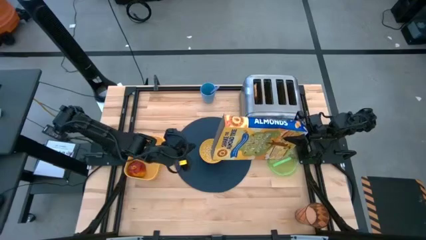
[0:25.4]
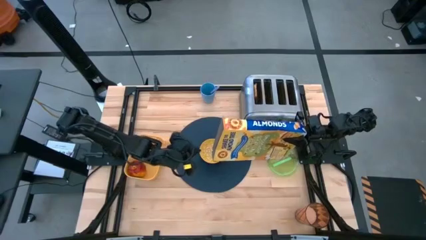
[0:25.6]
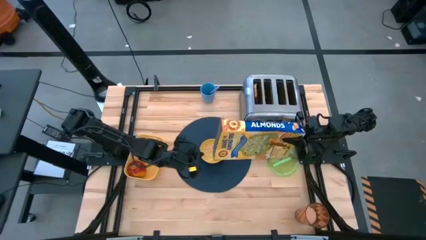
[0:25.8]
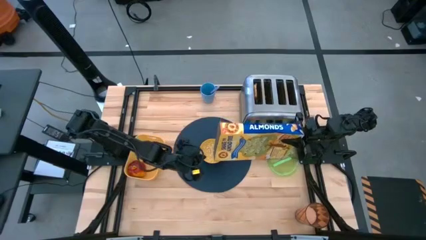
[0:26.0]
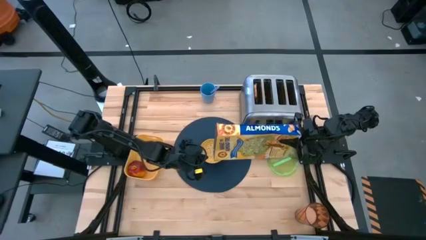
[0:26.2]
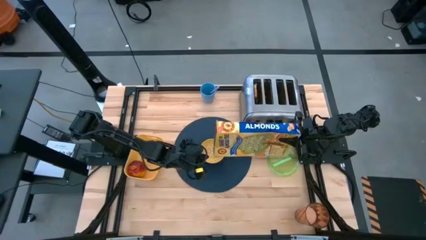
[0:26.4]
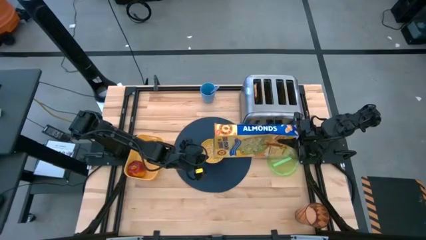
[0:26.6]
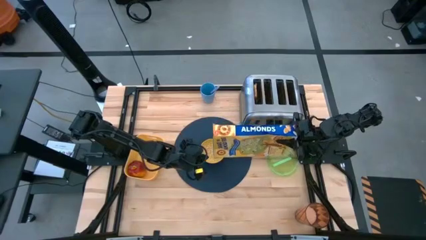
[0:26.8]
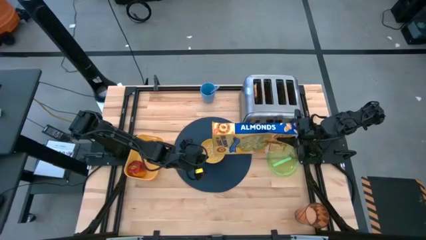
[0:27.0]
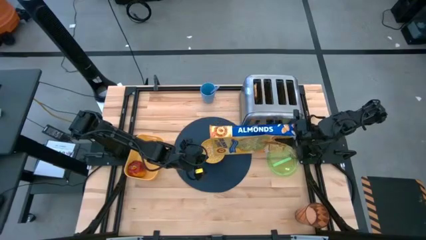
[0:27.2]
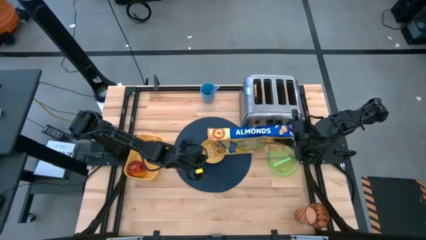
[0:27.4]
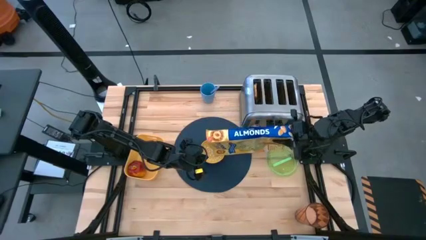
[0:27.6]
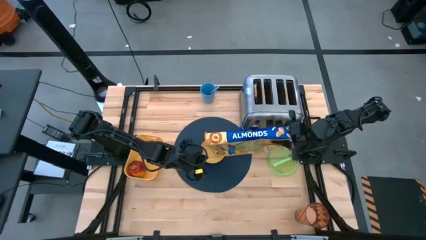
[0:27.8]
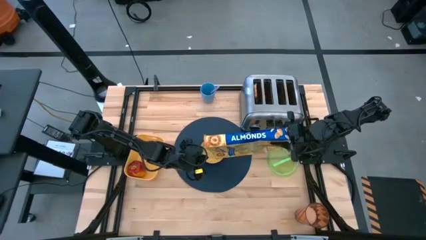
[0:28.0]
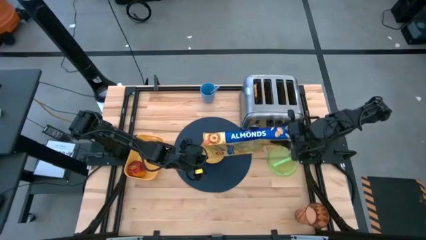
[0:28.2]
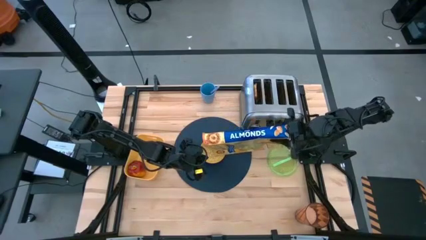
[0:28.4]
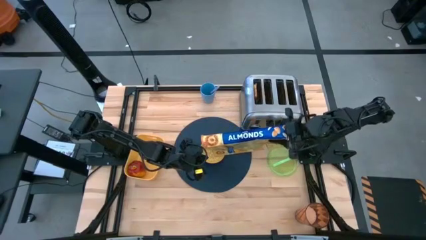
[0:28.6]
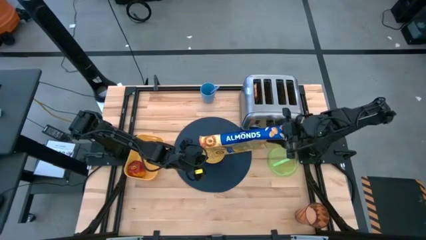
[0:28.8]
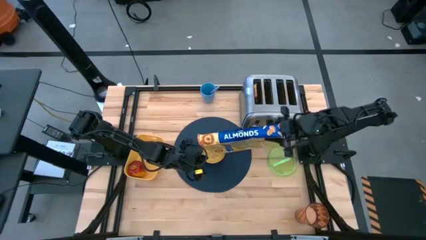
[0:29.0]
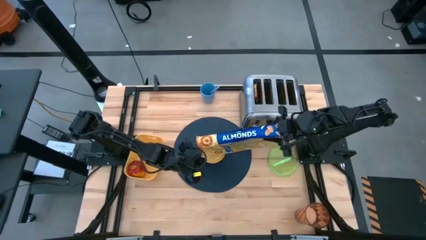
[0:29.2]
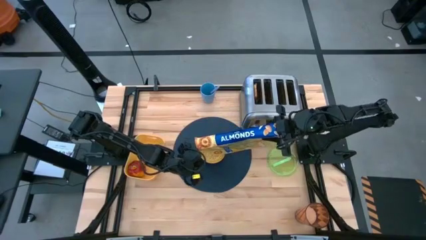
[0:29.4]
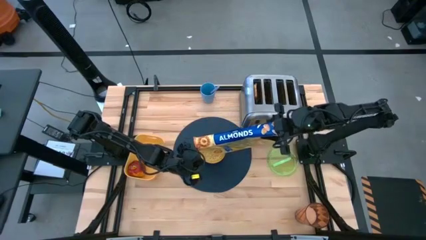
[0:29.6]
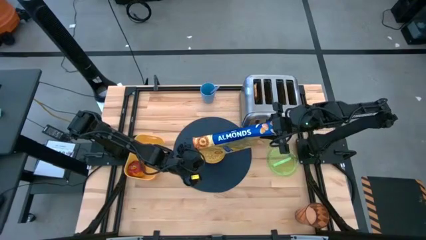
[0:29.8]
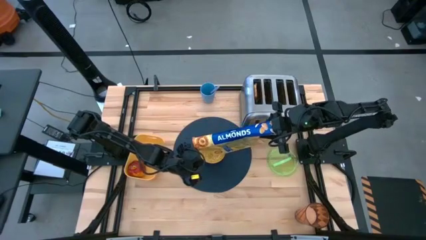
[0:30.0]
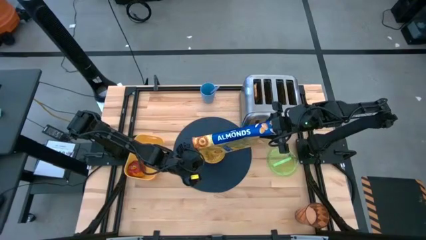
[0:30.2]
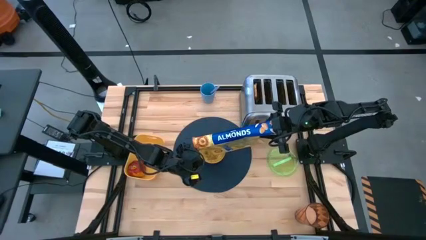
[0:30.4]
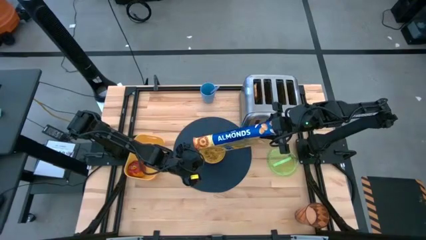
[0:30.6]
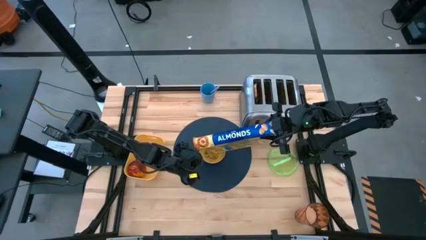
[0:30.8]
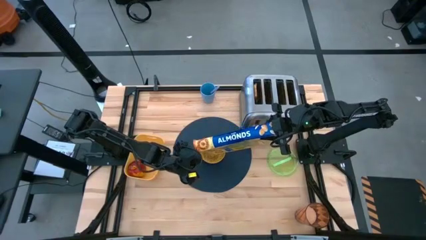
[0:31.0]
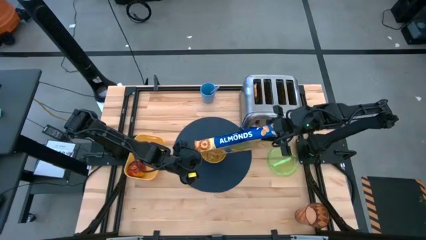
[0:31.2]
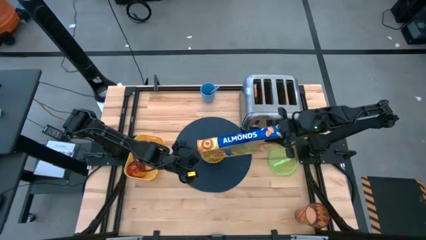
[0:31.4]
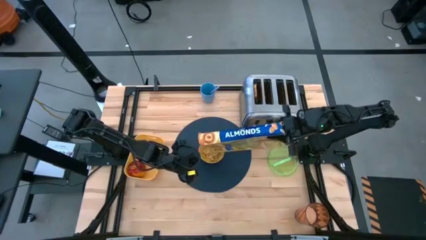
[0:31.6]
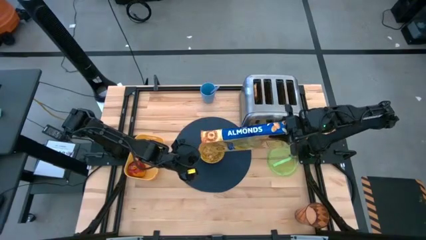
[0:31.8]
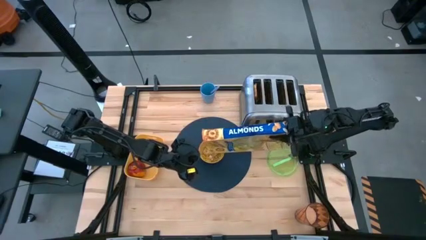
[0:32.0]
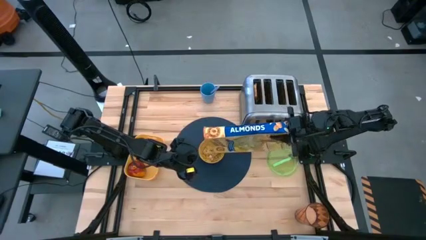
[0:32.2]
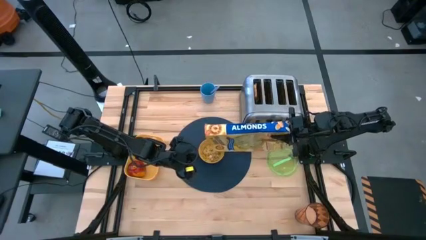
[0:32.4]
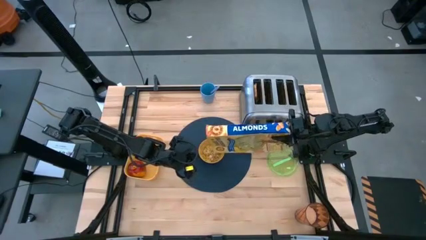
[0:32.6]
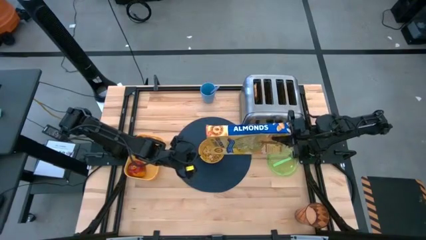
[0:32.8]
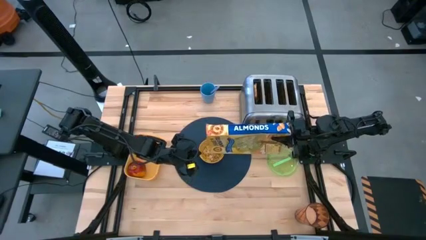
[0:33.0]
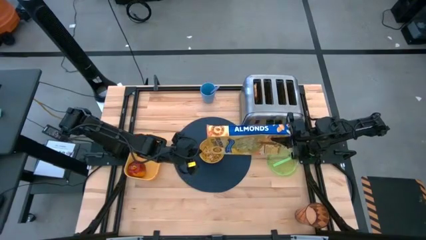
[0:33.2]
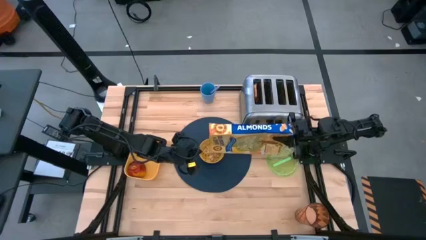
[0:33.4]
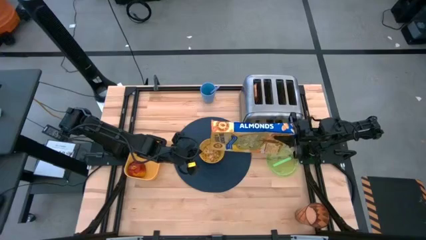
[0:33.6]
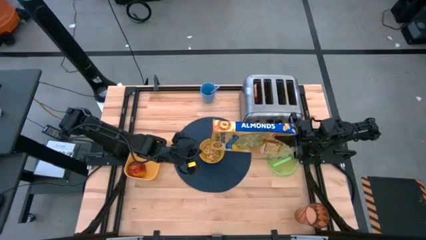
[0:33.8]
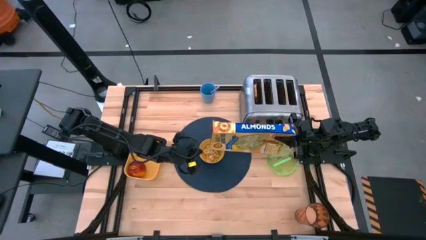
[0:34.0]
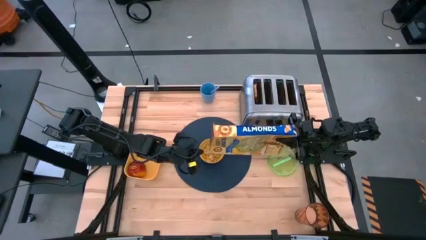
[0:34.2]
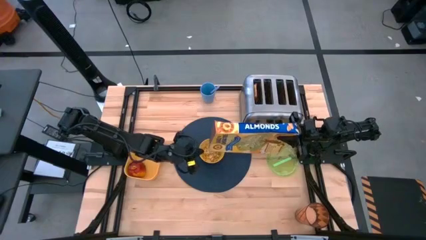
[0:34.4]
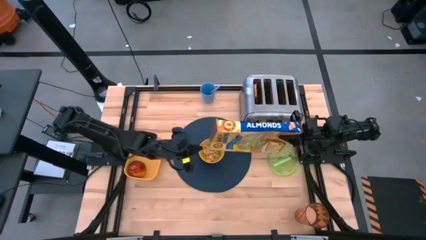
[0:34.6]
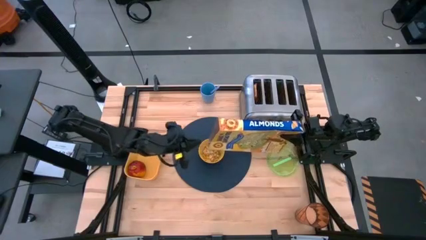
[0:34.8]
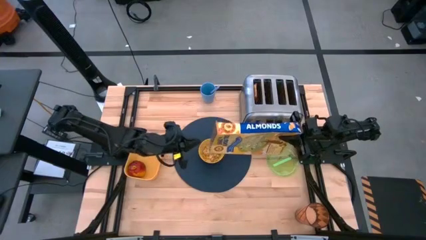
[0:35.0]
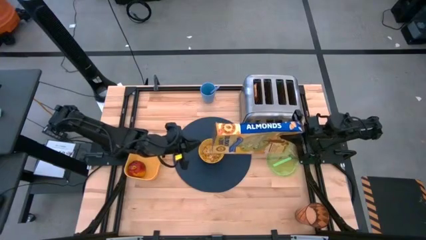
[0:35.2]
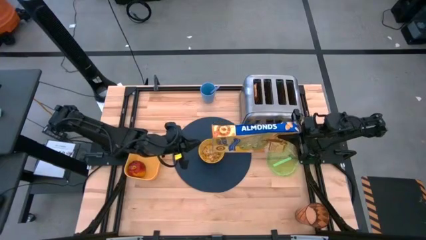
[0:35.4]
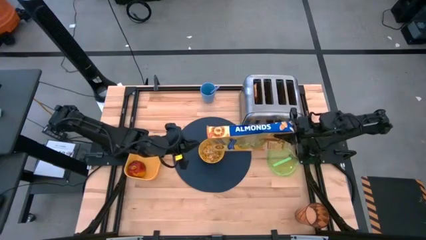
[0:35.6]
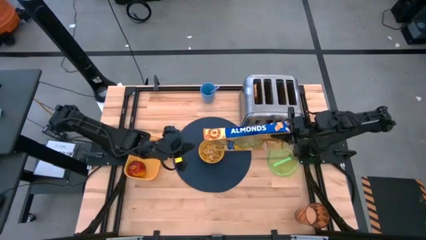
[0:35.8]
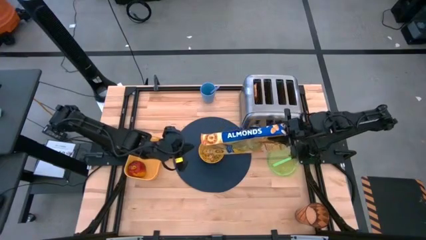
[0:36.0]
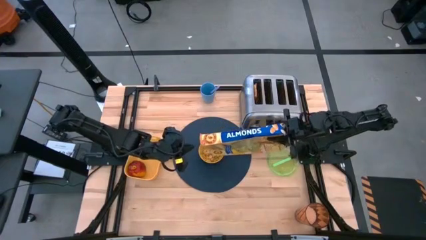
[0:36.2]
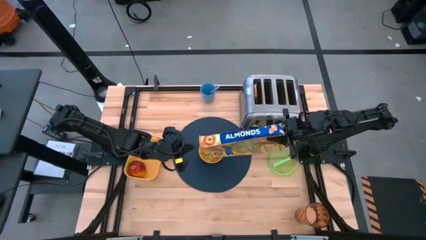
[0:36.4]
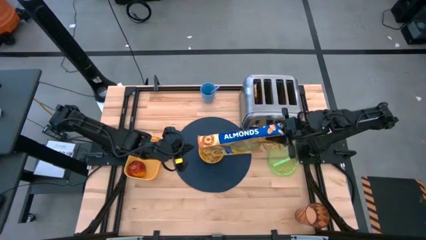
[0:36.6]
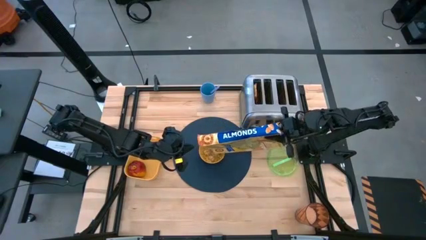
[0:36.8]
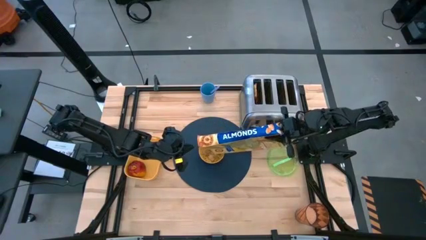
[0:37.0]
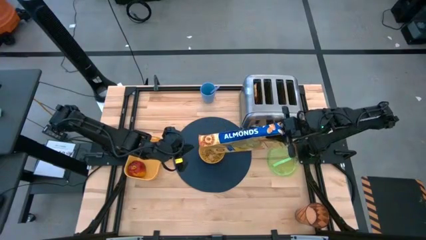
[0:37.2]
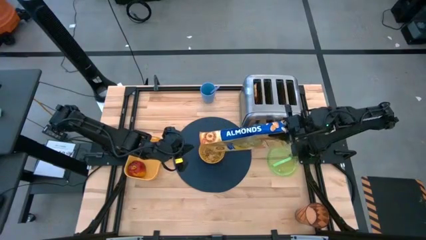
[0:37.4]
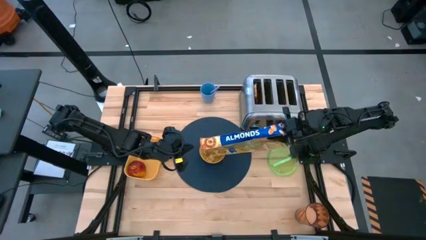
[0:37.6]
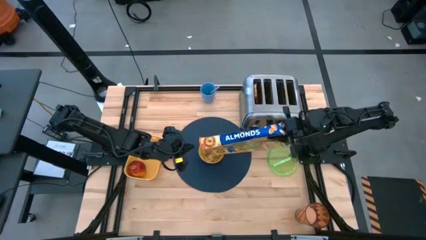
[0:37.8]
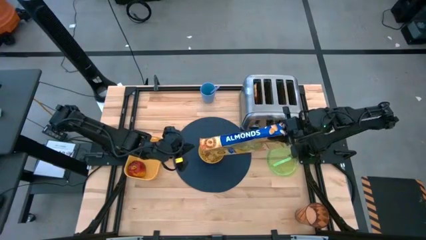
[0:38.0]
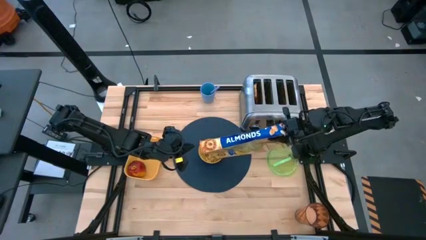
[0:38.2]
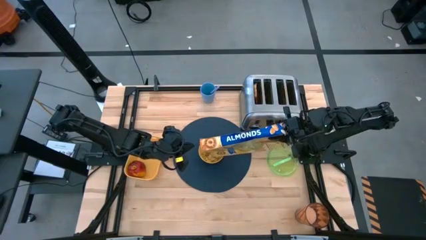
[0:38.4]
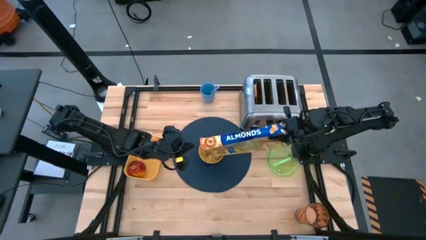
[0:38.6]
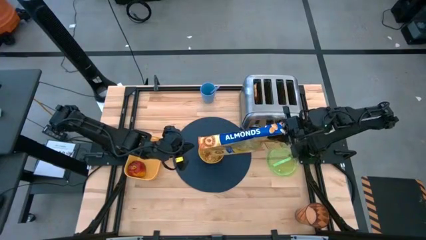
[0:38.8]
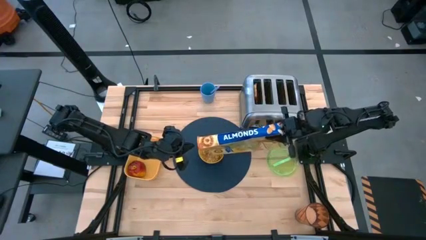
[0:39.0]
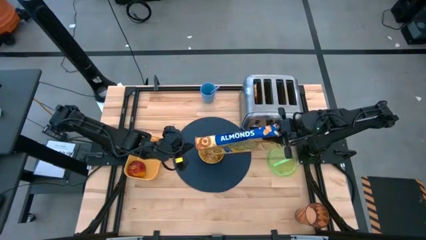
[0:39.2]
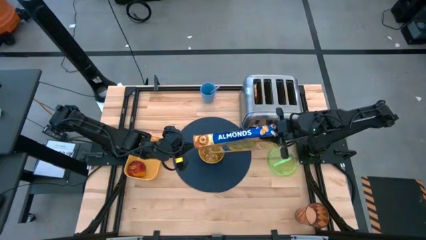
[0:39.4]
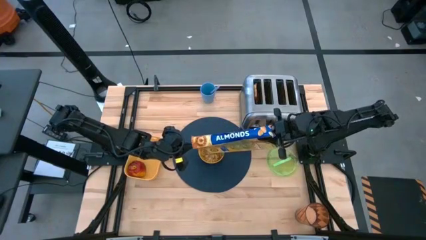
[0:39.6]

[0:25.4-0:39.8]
Task: Arrange a breakfast setting
Pour the cereal from the cereal box into the bowl

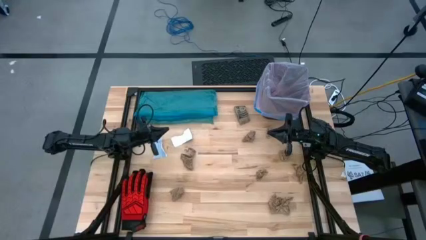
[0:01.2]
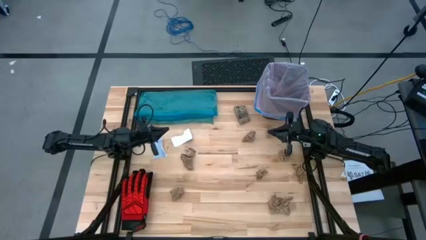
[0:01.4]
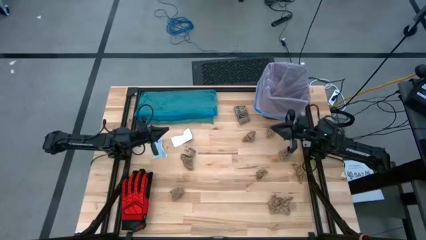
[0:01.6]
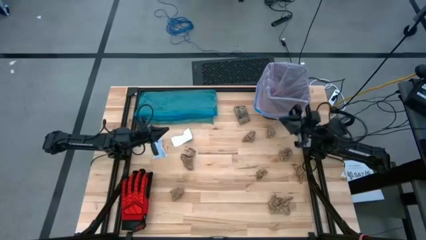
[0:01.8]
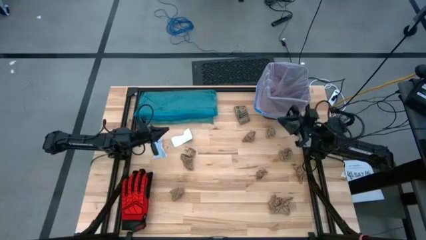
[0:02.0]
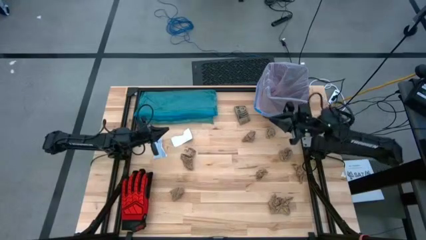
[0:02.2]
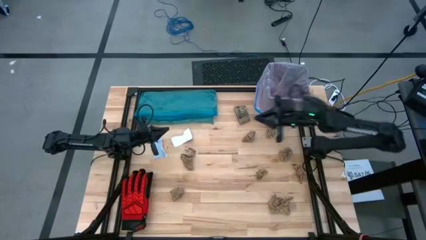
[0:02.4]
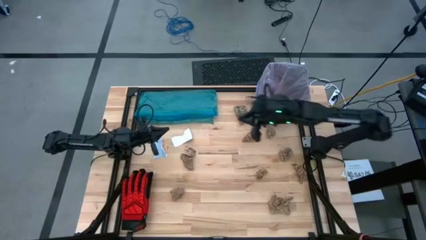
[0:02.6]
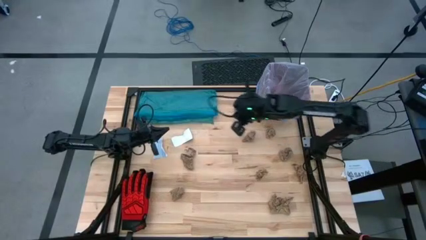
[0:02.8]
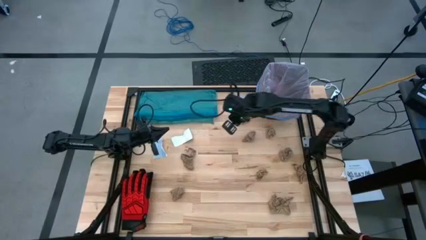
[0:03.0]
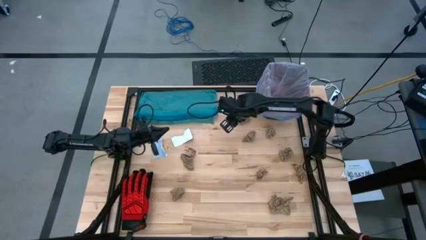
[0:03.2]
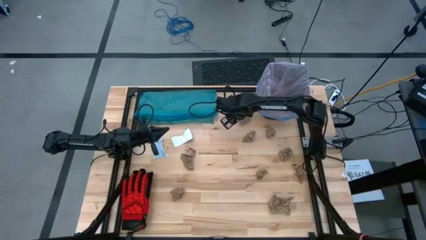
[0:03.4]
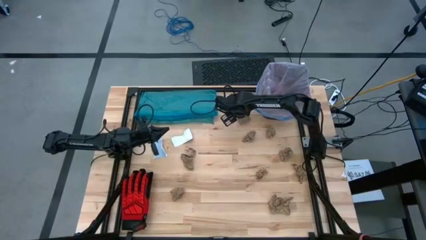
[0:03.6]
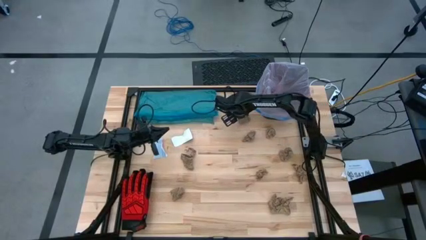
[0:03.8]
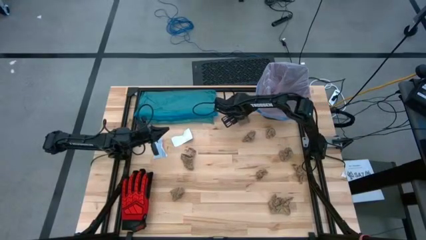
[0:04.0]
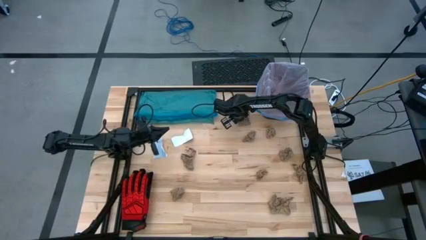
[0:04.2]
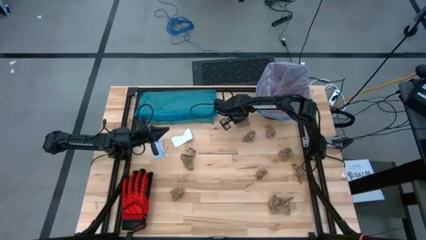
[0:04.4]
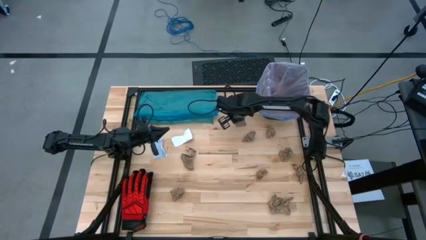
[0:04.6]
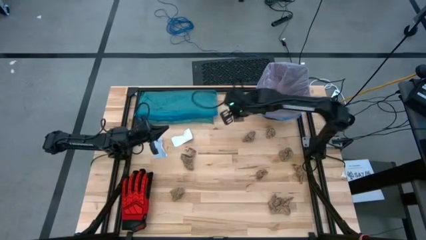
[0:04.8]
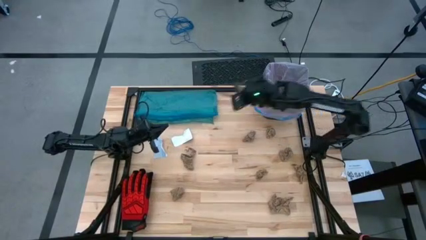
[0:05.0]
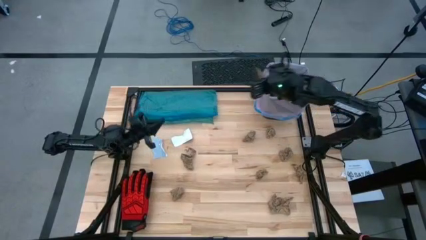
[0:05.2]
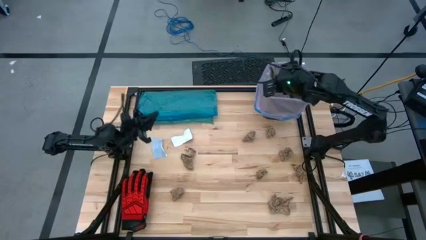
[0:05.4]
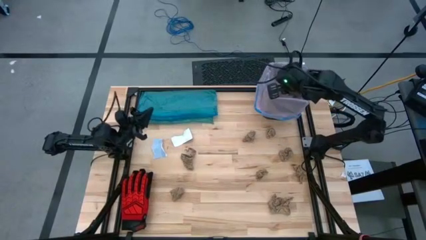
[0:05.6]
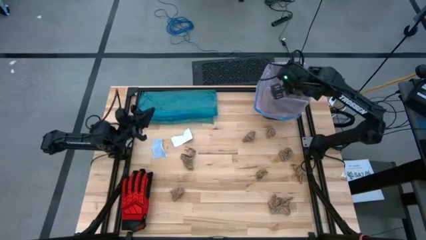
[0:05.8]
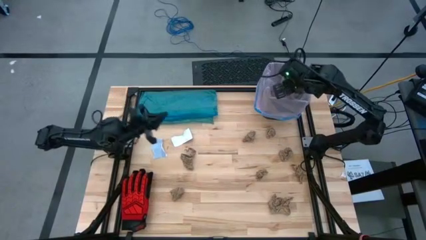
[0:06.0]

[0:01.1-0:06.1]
Task: place trash/remove bag and relplace
Put the cardboard coffee sleeve in the trash bin
